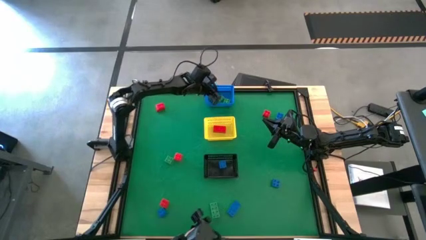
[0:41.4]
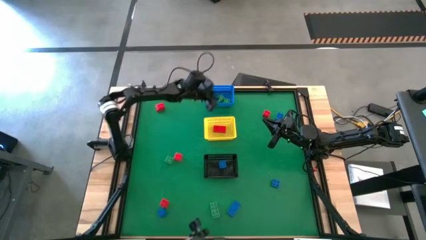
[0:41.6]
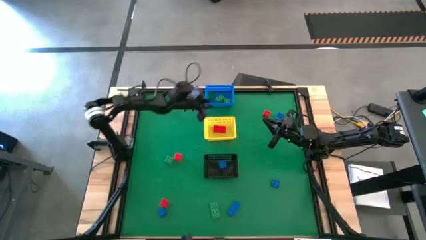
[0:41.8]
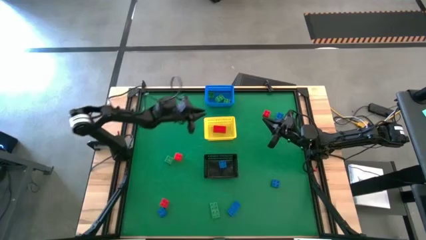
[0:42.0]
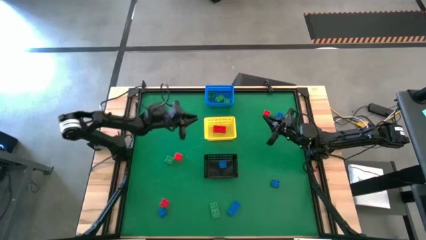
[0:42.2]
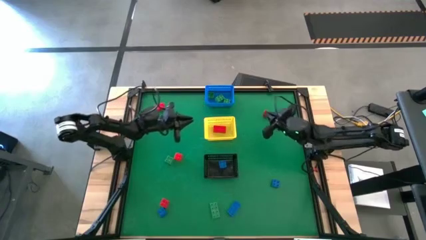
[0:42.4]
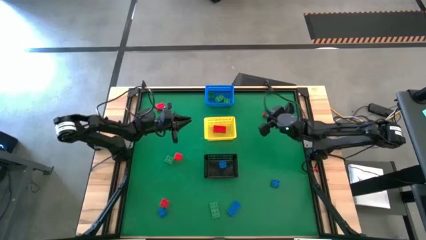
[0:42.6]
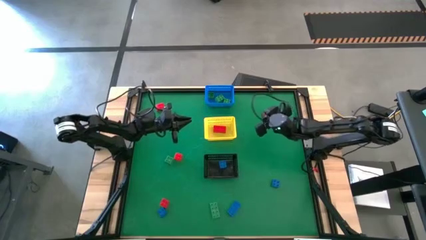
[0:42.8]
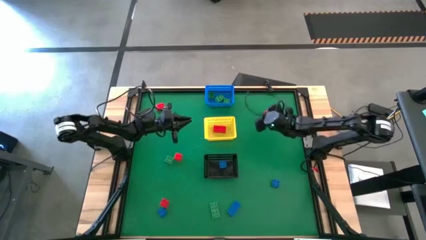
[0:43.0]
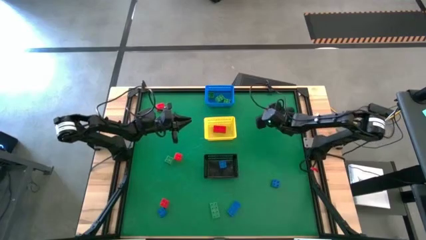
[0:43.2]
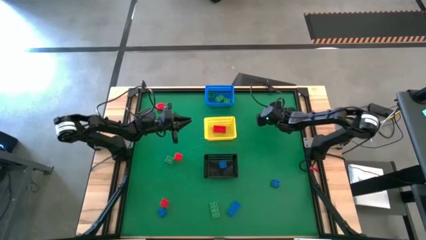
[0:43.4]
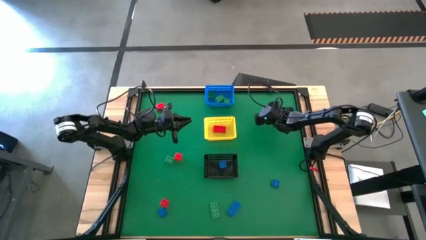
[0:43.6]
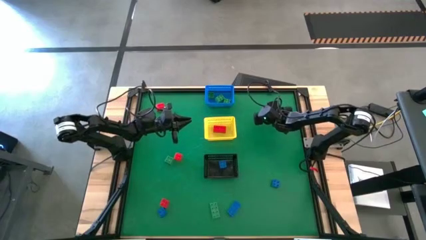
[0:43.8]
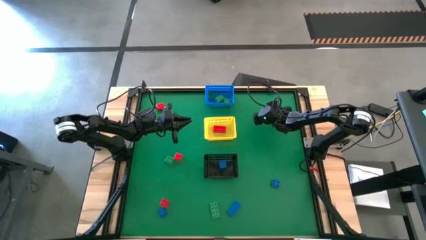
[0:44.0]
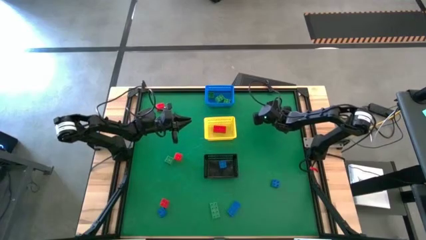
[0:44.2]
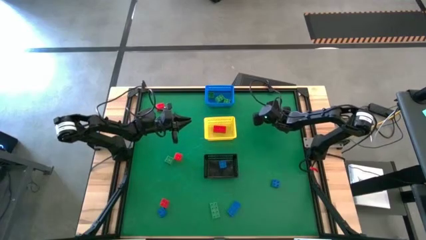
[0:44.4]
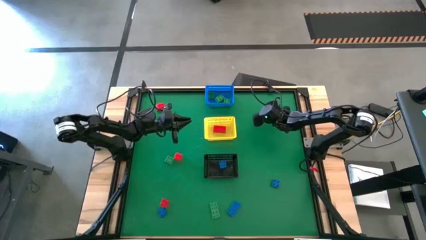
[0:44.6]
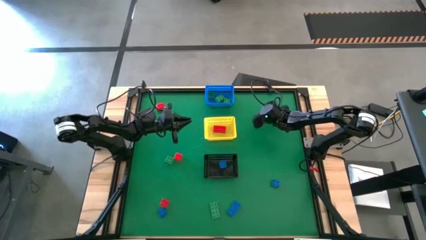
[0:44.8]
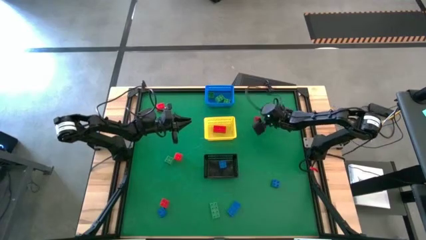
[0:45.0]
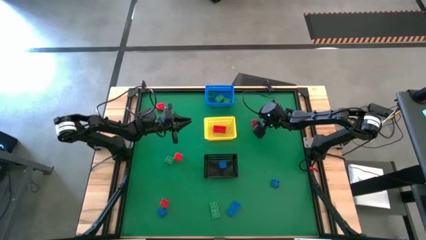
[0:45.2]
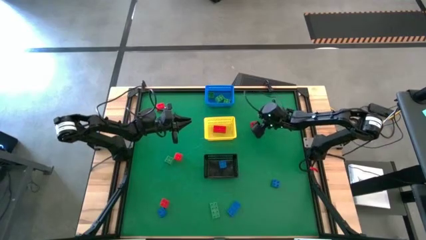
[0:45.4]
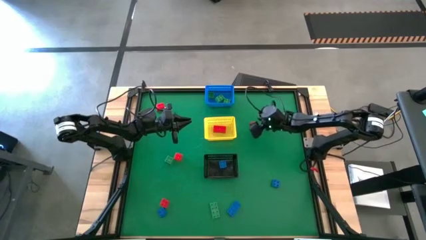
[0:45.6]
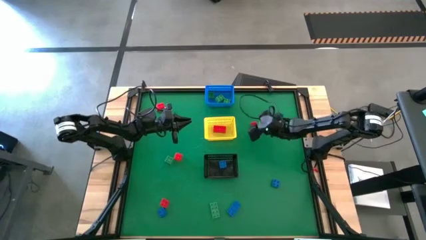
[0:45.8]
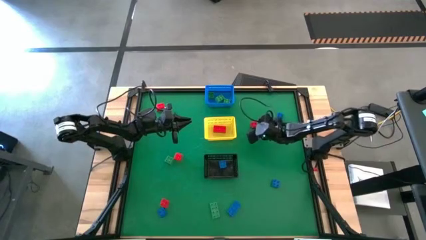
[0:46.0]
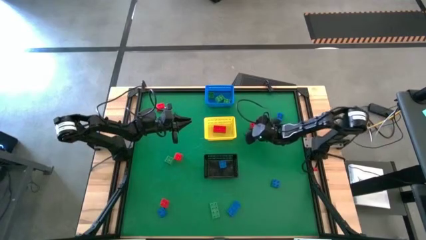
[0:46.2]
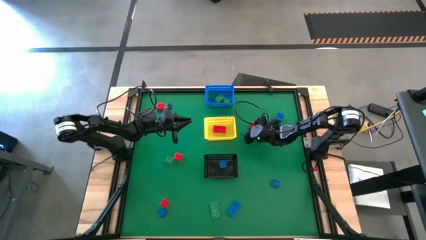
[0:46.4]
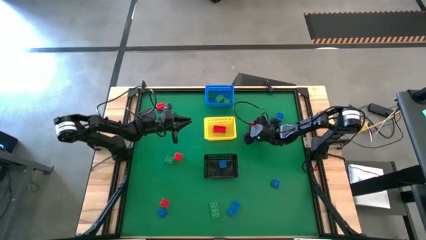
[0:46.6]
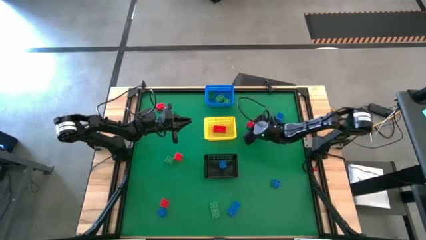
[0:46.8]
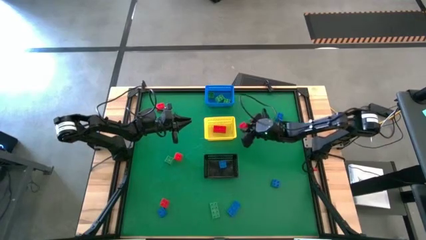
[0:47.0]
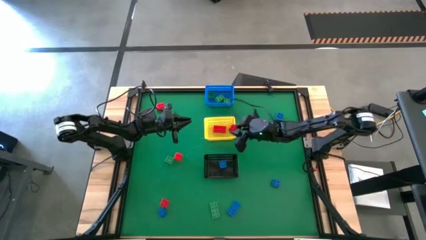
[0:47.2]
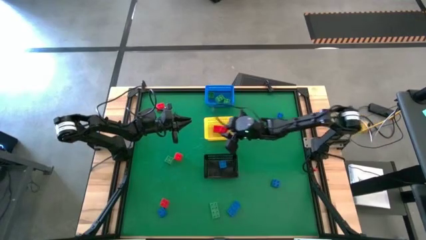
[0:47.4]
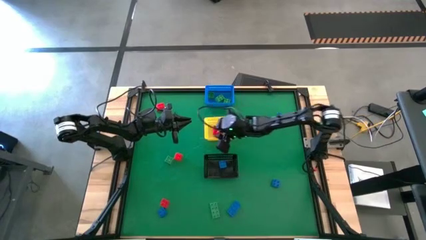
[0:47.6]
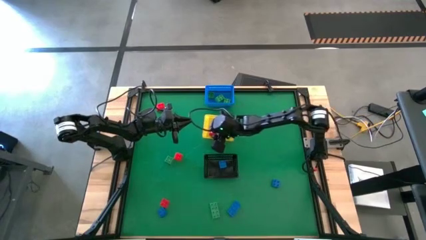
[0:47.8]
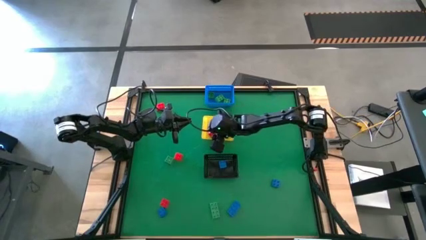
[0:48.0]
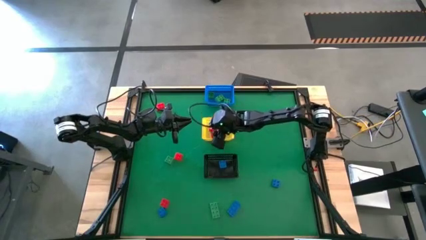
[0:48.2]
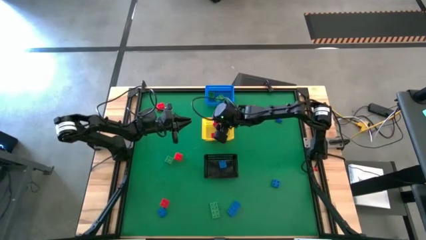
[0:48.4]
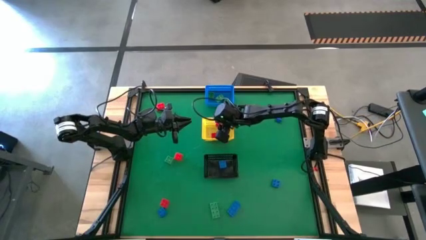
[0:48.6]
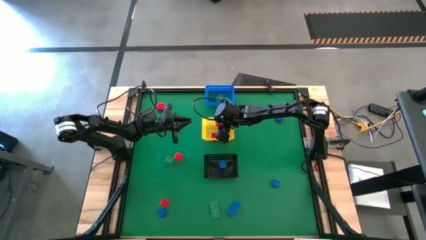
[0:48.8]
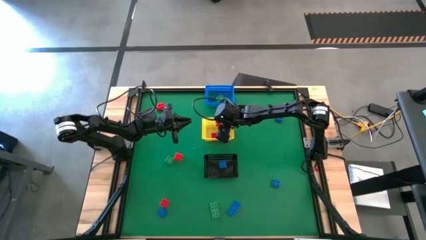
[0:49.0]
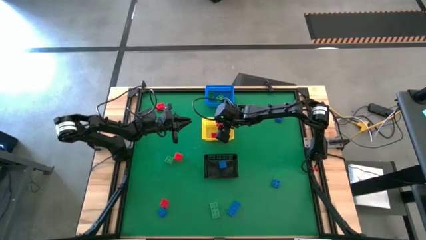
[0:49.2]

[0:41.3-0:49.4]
Task: Sort & place blocks by color
Put the red game piece into the yellow bin

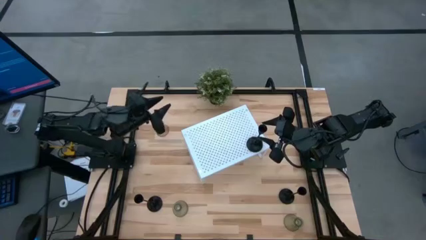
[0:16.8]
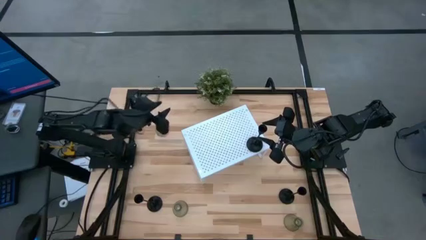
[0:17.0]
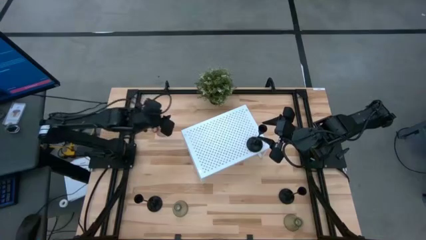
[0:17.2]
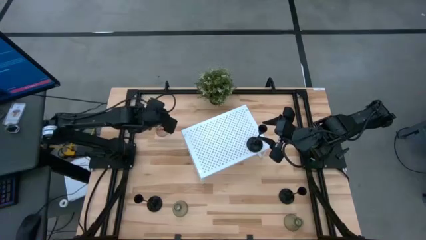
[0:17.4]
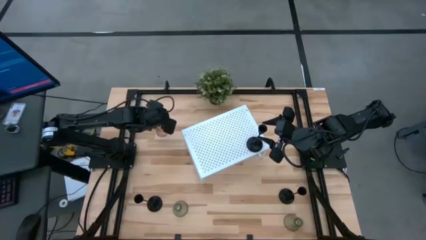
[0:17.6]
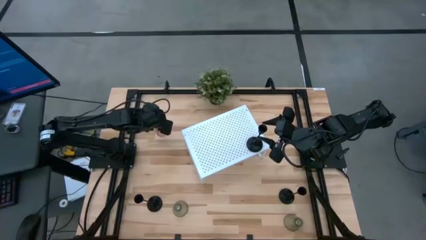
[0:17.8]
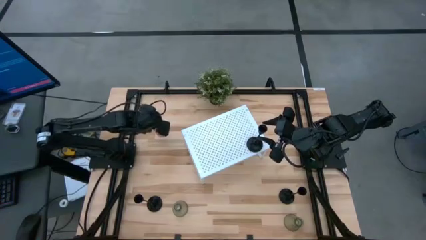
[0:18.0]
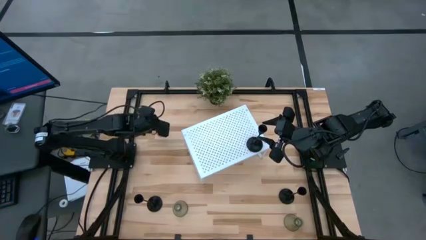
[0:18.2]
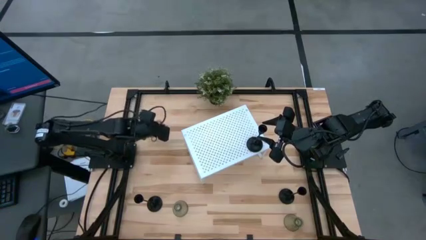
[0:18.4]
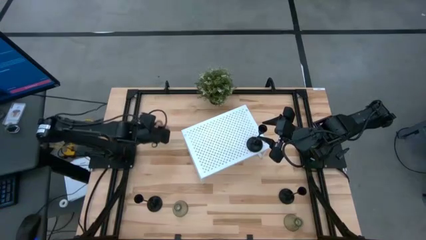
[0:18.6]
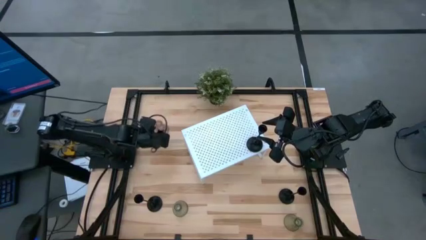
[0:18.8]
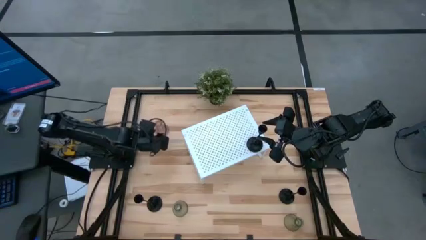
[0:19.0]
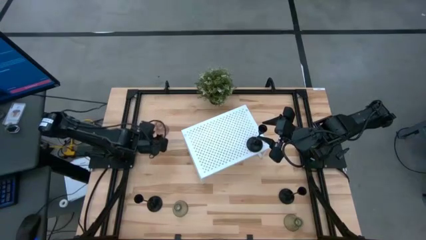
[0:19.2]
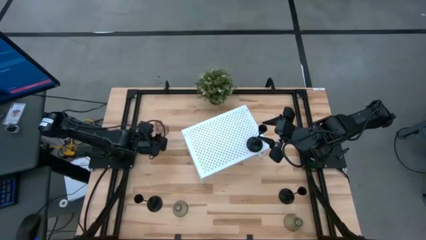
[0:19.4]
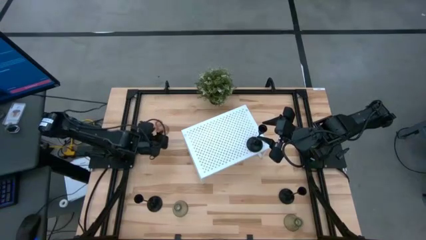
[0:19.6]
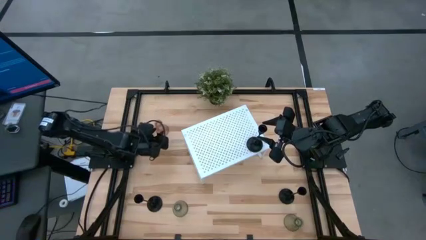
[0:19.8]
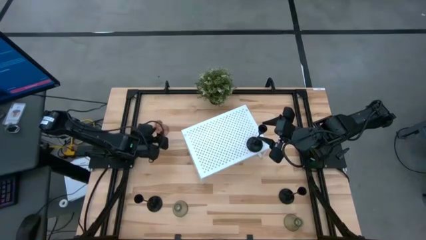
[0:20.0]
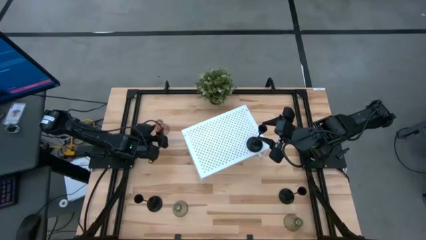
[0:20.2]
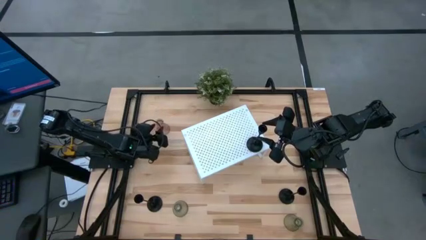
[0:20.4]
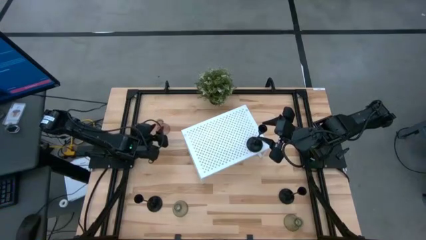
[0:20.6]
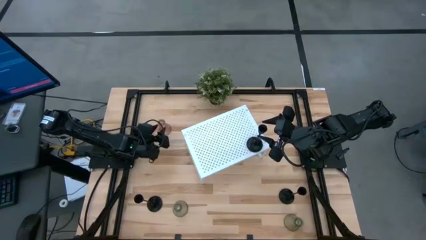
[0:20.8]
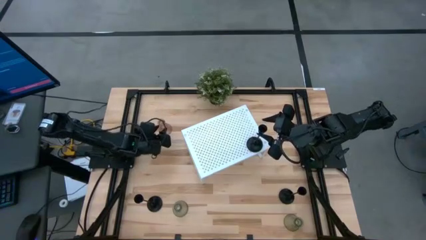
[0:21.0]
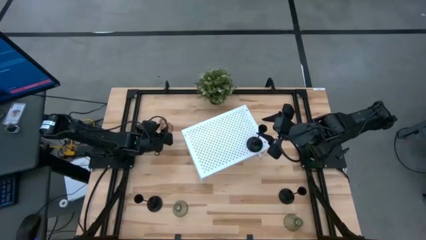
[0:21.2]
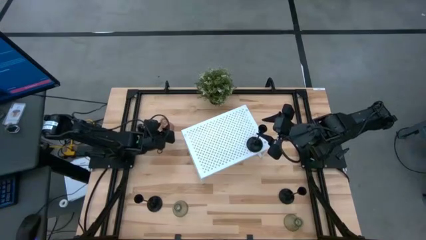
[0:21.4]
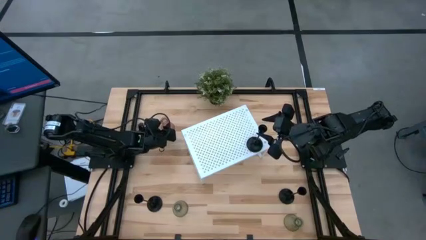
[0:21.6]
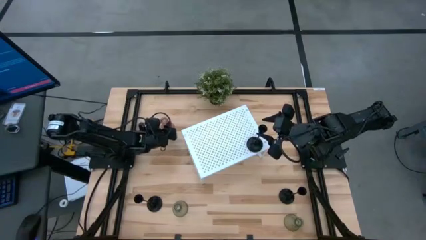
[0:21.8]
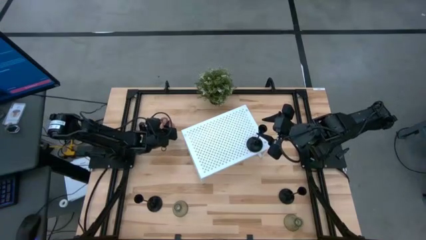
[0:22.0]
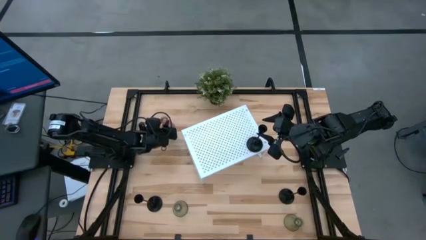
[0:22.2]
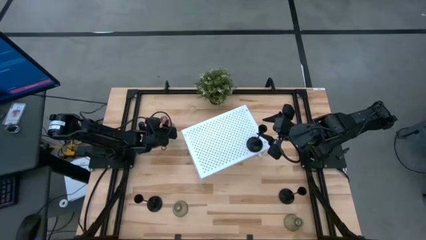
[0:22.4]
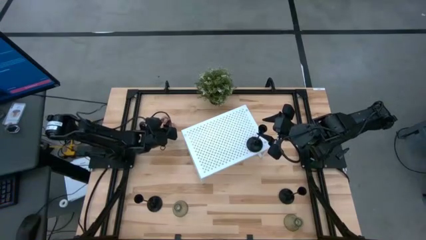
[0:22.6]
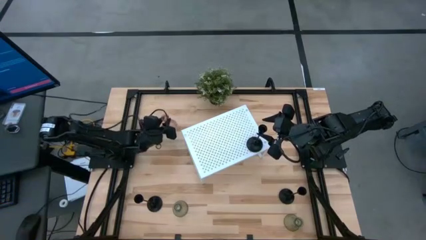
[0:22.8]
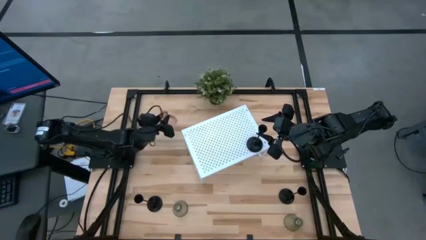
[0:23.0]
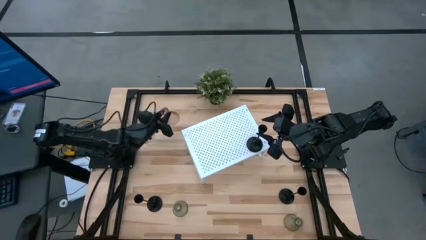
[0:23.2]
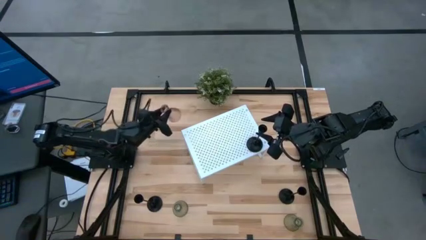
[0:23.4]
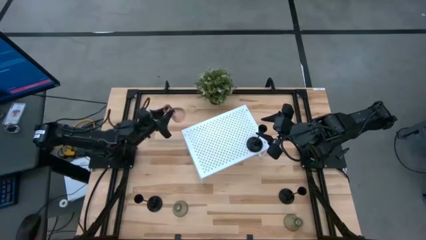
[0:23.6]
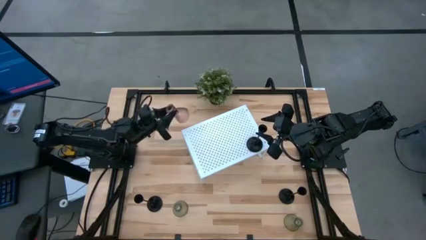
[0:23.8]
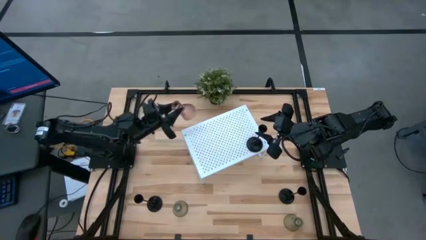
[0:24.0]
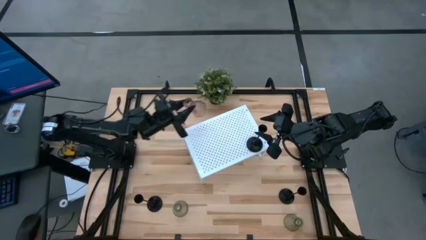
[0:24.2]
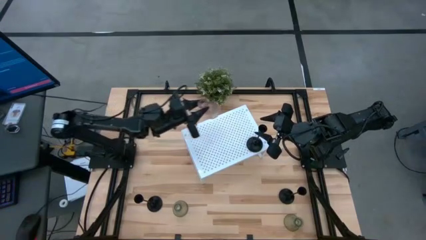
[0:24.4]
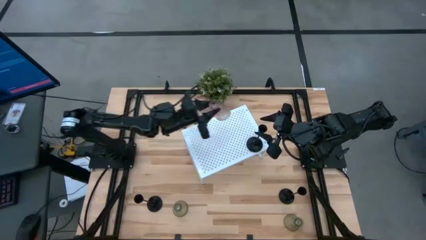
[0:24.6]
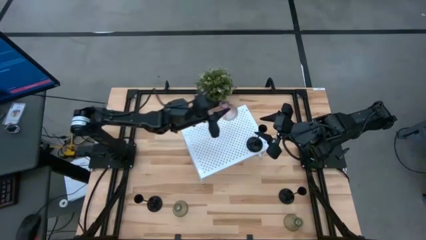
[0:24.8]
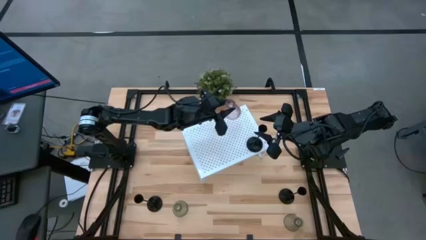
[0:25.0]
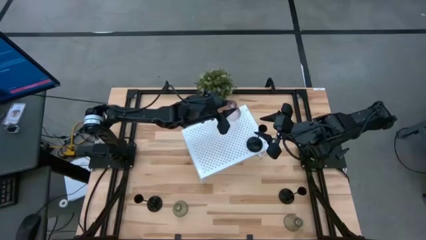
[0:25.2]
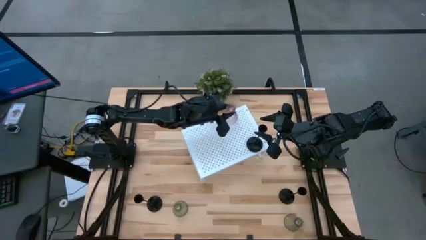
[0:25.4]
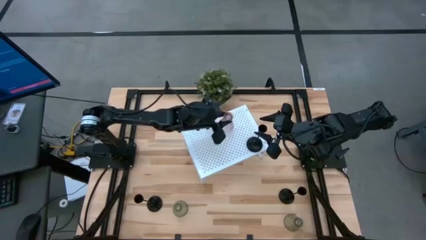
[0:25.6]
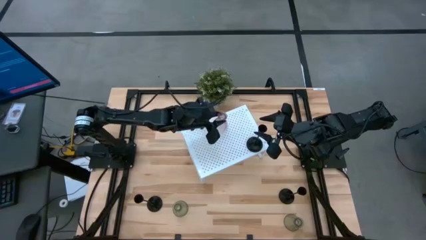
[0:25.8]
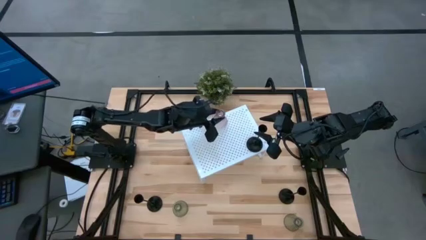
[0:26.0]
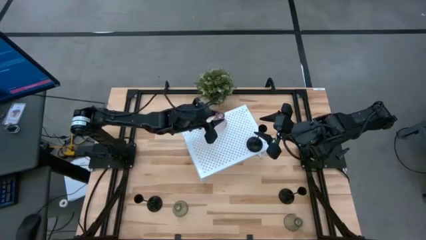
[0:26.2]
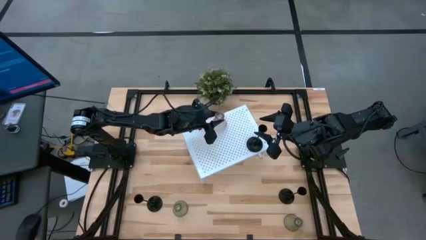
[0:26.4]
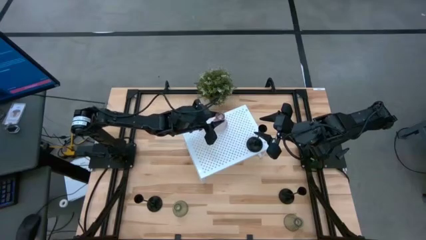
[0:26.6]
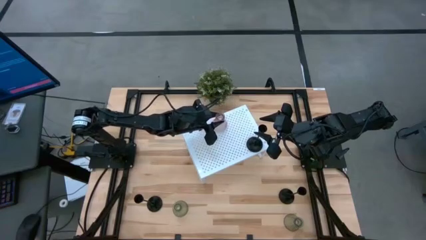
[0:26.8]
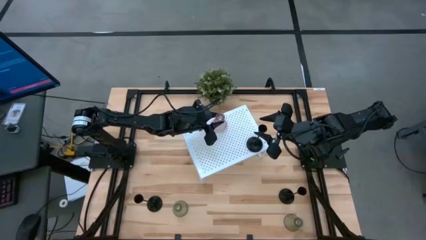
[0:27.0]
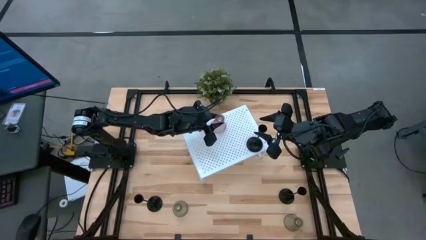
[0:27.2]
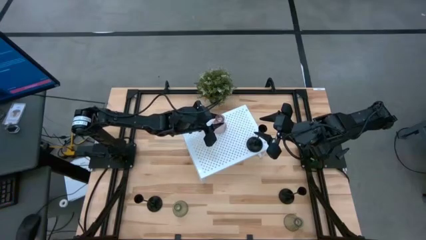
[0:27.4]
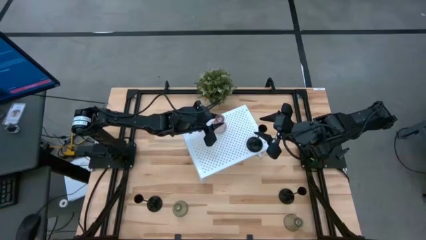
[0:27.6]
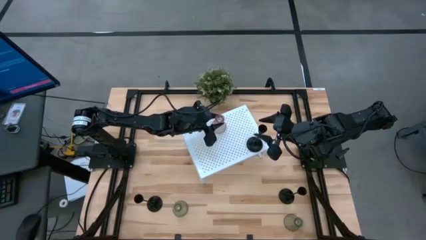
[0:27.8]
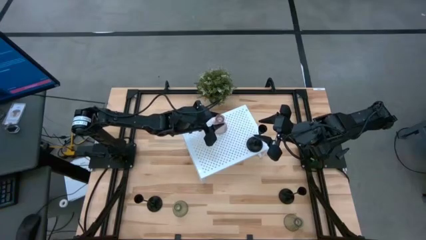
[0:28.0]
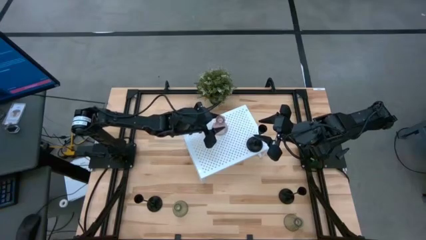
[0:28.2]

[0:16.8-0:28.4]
Task: Pick & Place candle stick holders
Put the pink transparent candle holder onto the shelf
